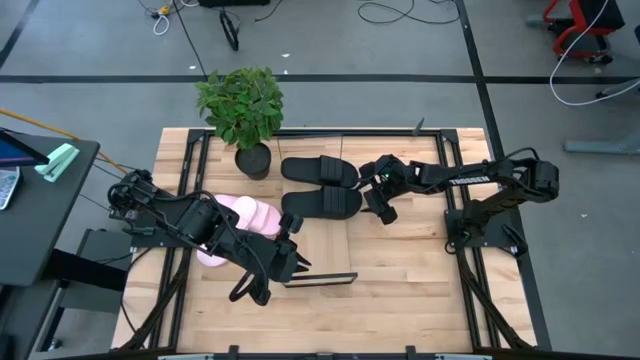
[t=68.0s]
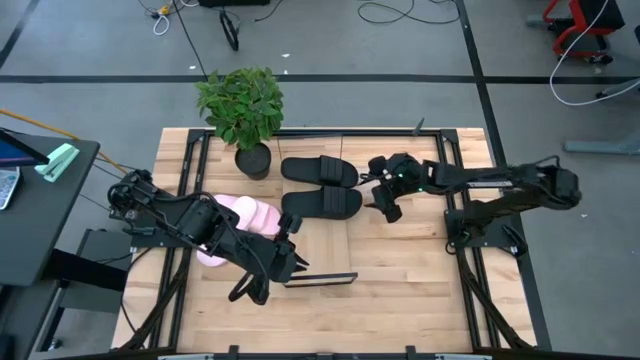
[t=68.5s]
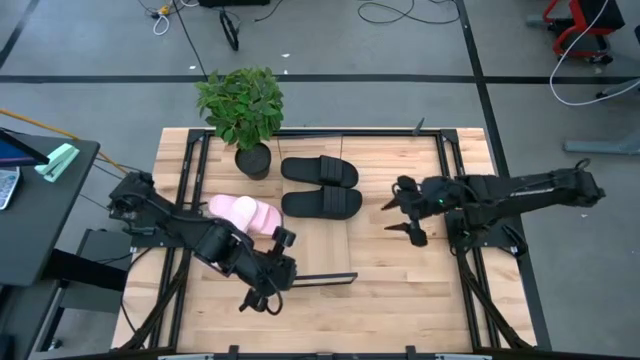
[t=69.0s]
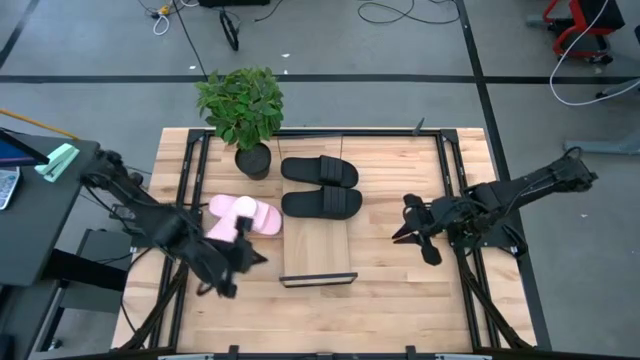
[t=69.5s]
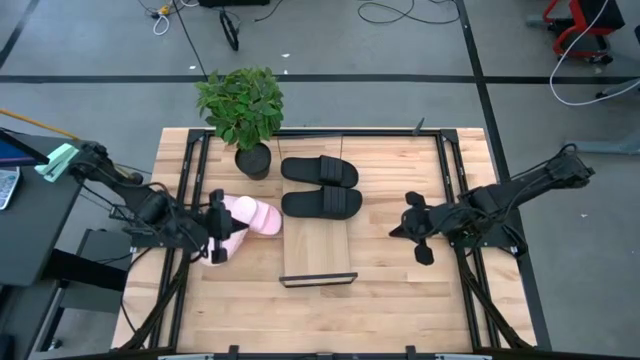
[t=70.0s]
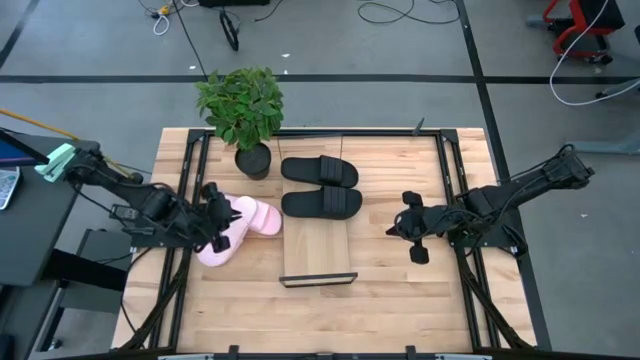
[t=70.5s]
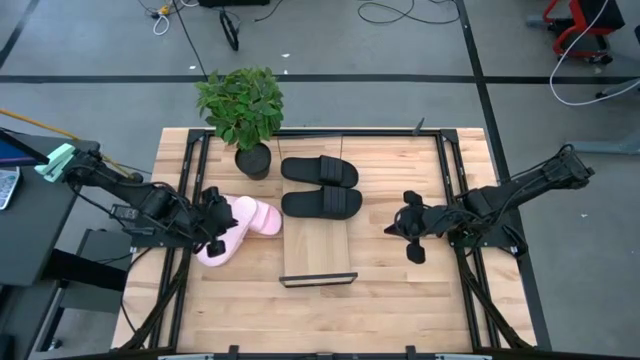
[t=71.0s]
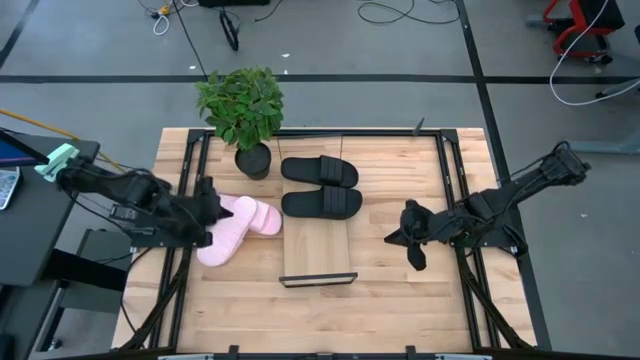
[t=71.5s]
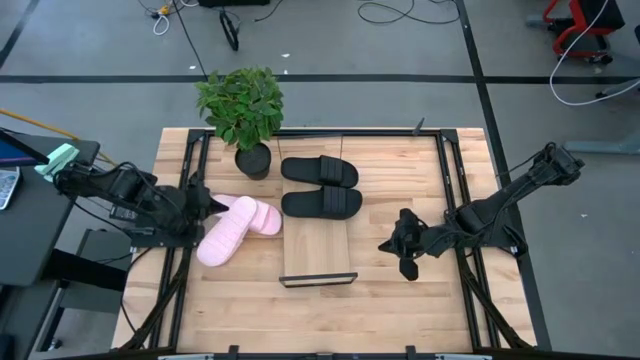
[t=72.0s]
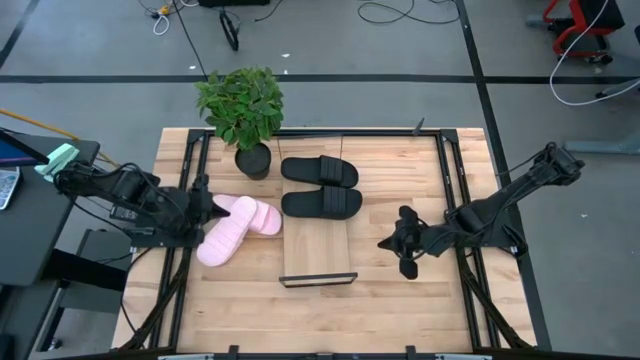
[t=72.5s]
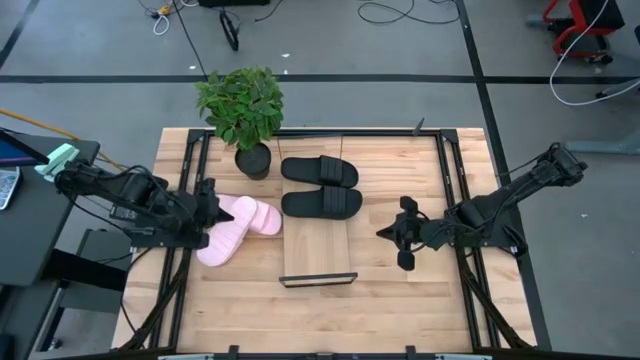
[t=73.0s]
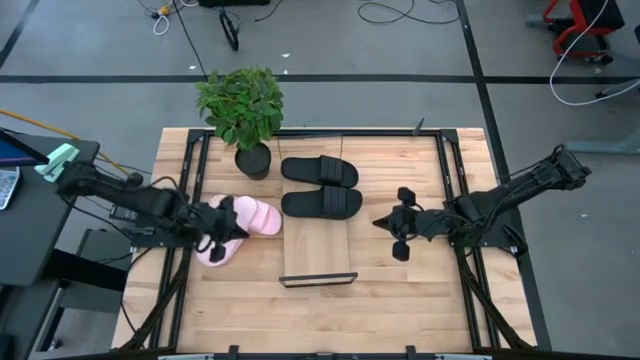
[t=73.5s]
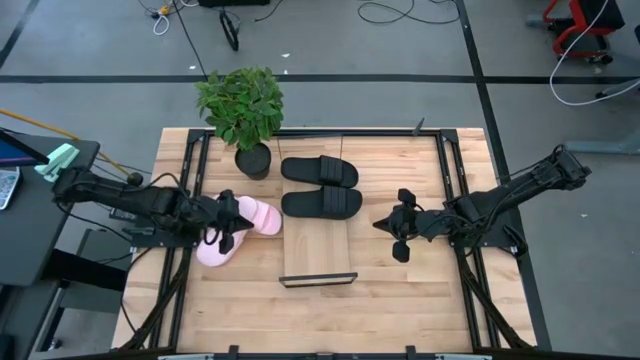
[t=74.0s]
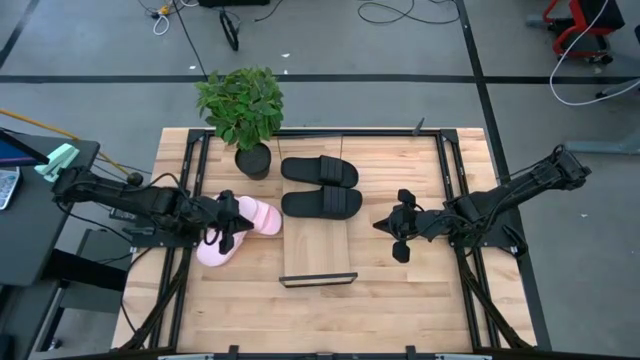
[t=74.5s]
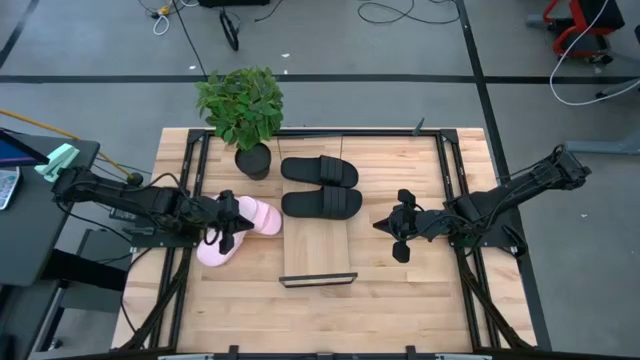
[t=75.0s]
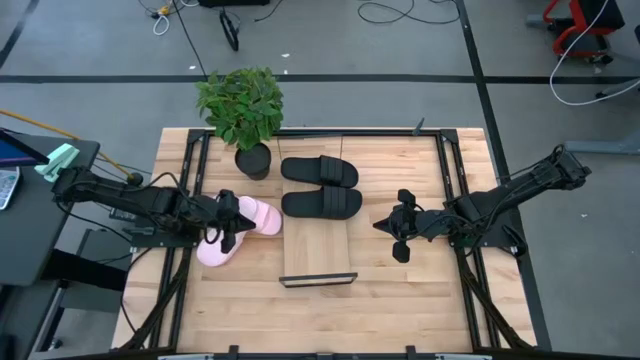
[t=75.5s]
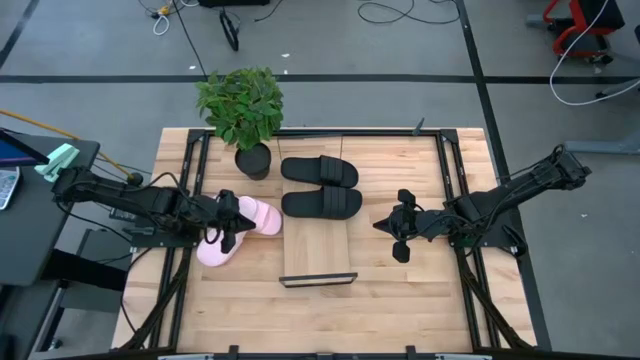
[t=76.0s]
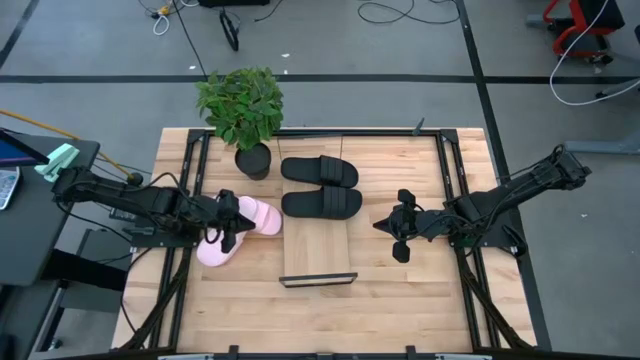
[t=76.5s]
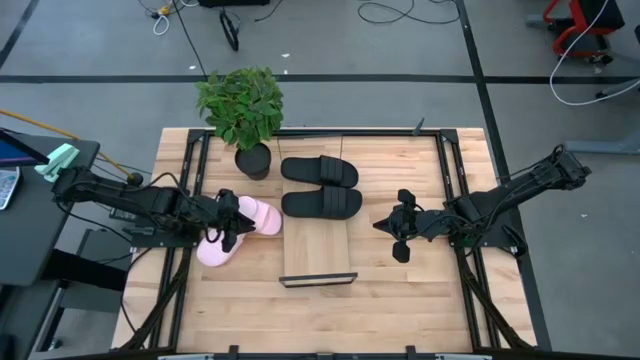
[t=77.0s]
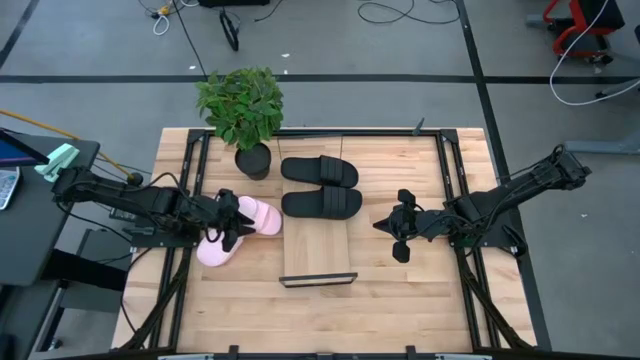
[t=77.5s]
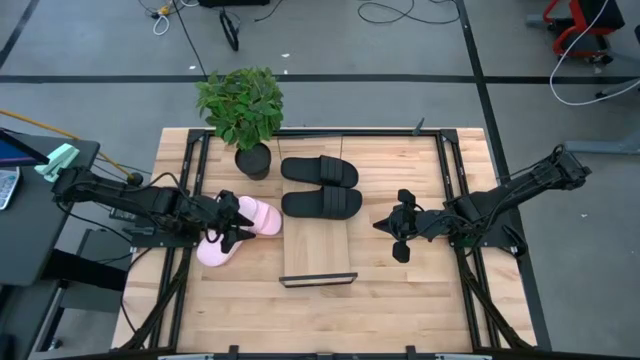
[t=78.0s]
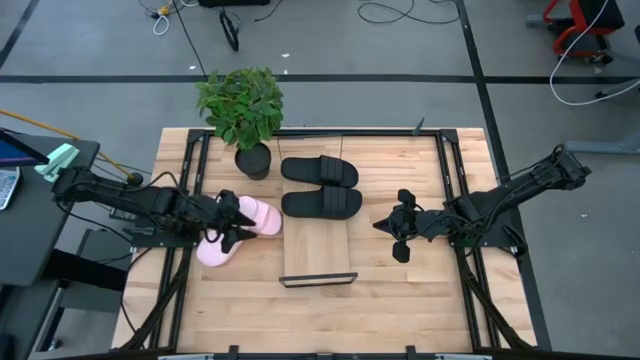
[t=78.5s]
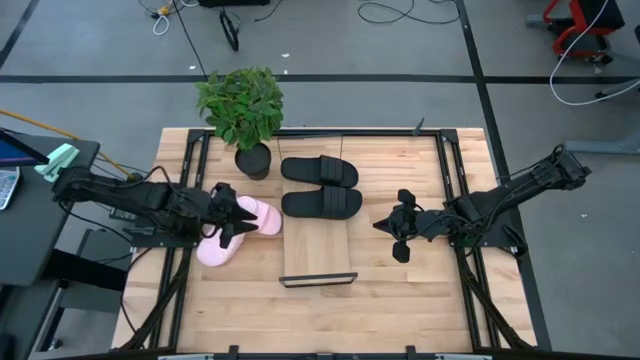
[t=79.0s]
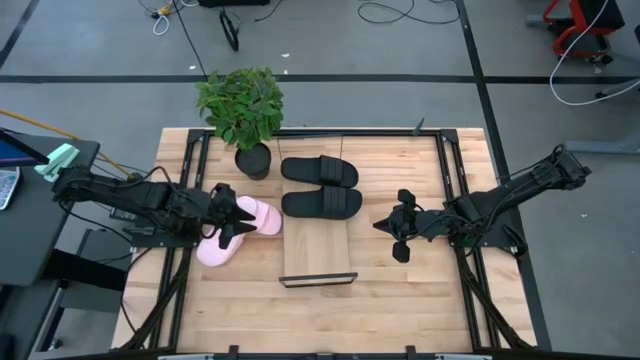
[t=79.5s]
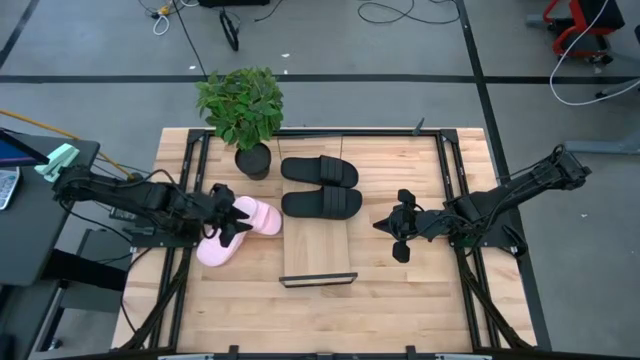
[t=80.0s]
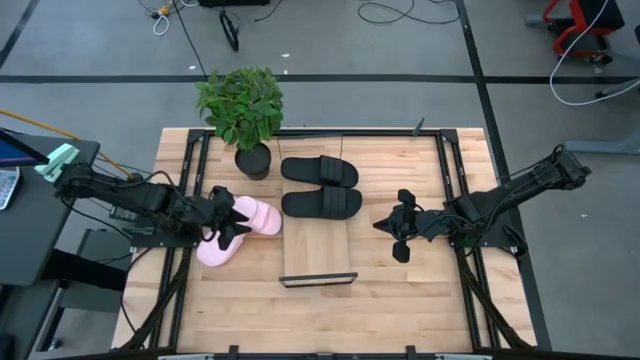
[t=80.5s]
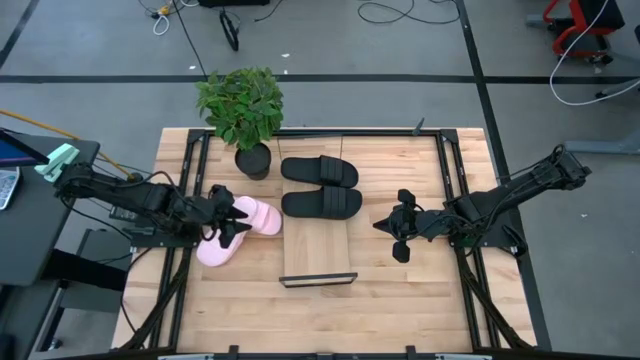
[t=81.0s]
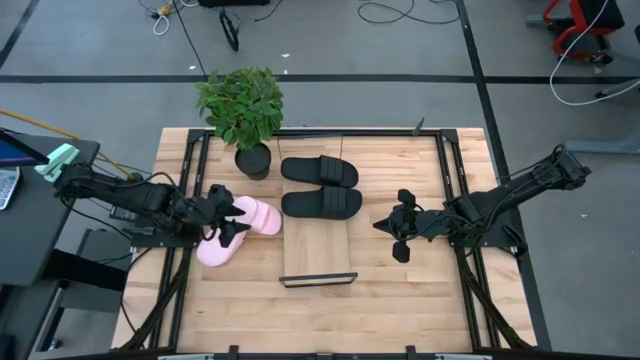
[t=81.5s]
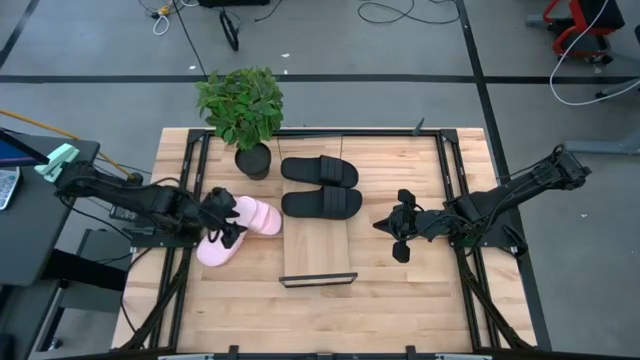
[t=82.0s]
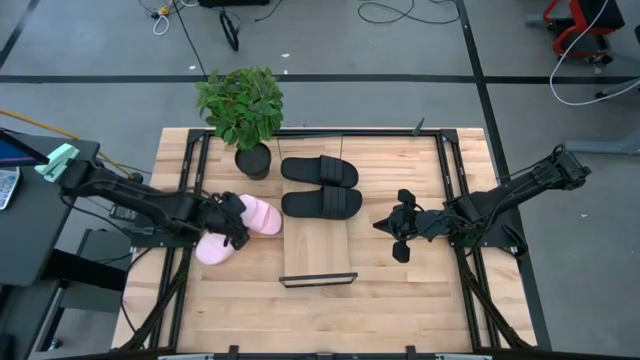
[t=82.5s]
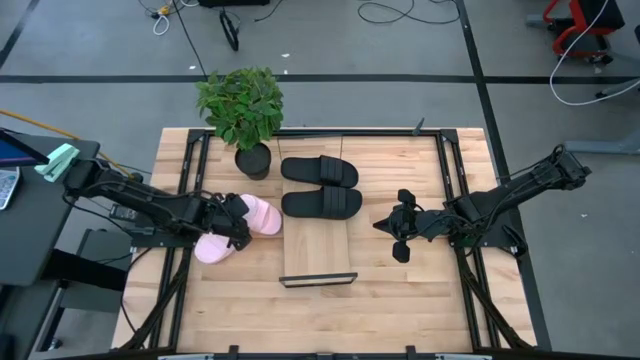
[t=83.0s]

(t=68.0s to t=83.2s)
Task: Pick and place slides into the shelf
Put the bottom pink slipper on the shelf

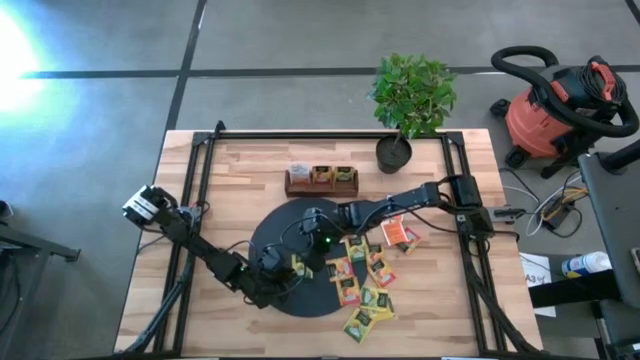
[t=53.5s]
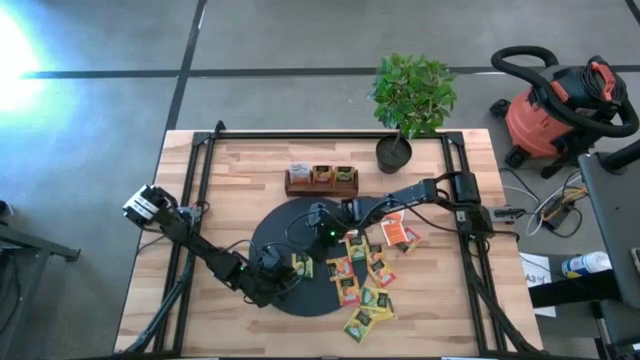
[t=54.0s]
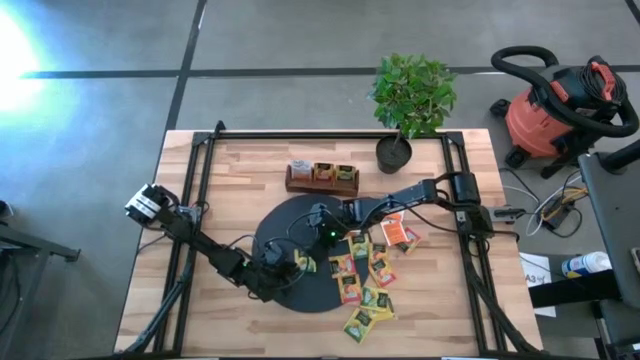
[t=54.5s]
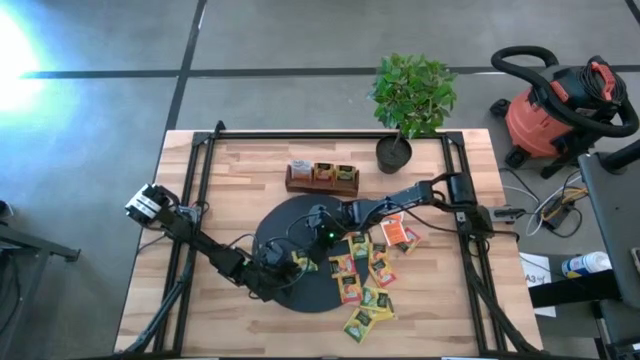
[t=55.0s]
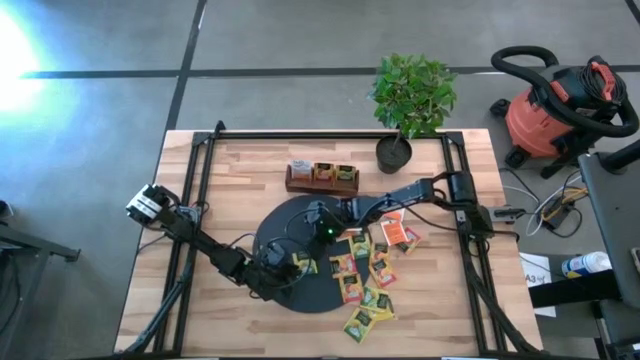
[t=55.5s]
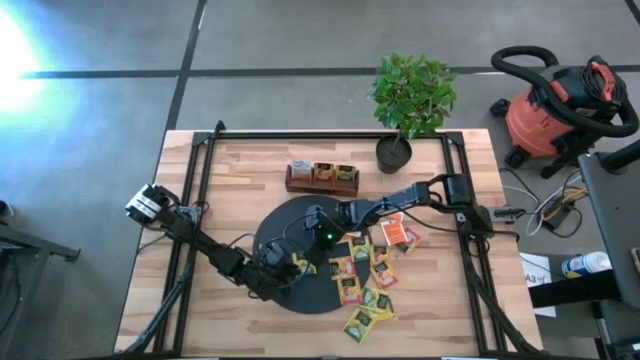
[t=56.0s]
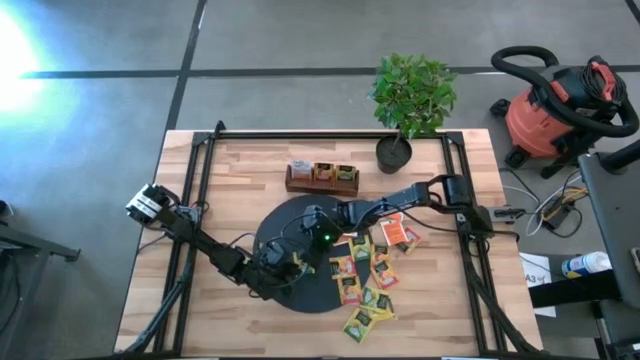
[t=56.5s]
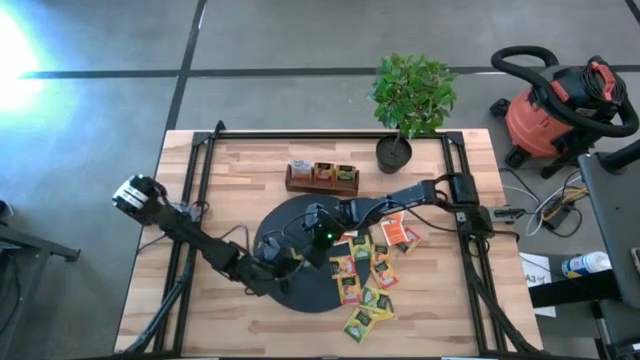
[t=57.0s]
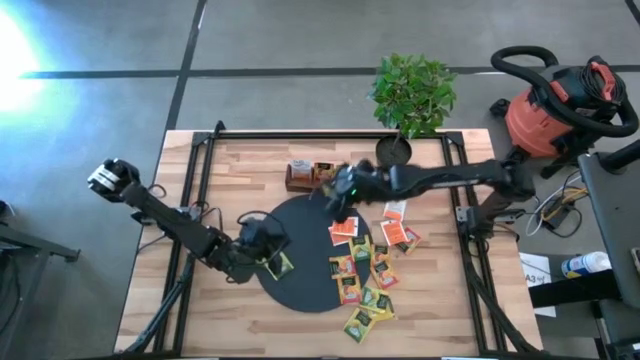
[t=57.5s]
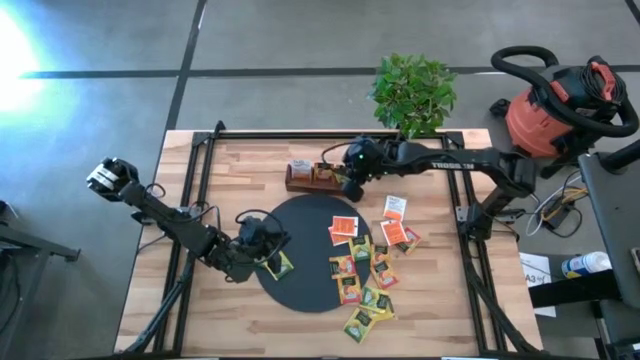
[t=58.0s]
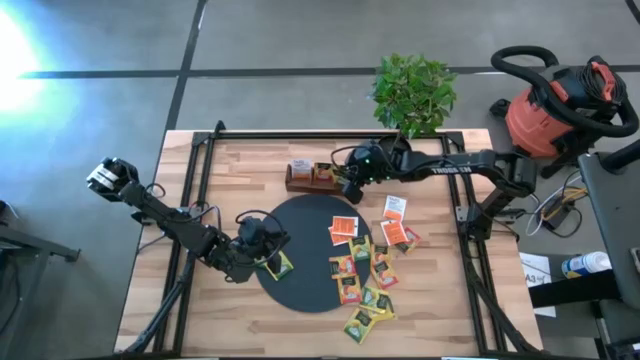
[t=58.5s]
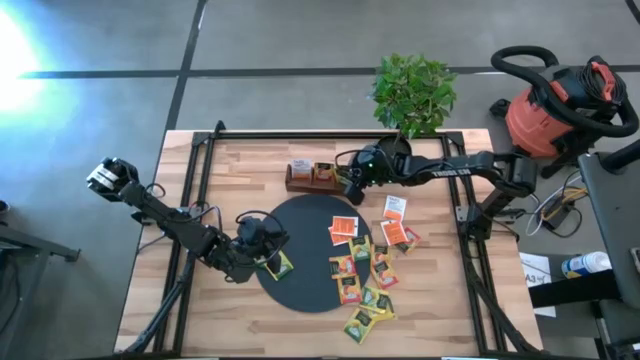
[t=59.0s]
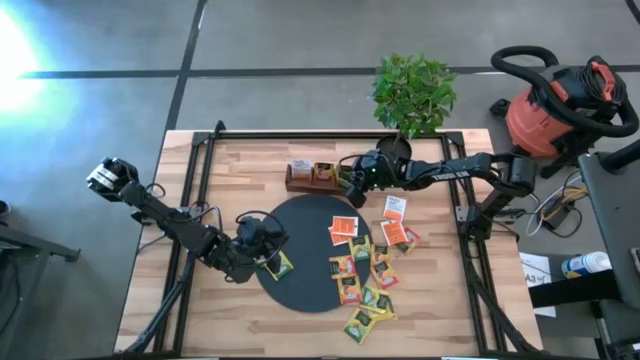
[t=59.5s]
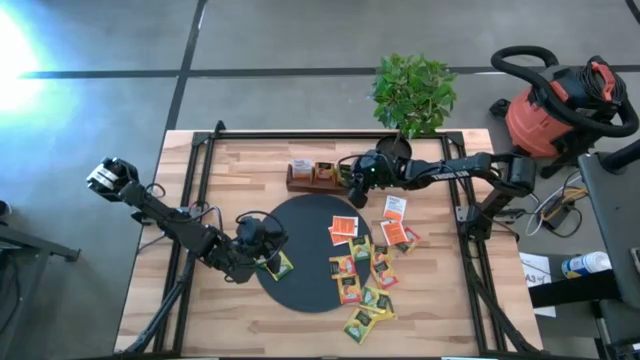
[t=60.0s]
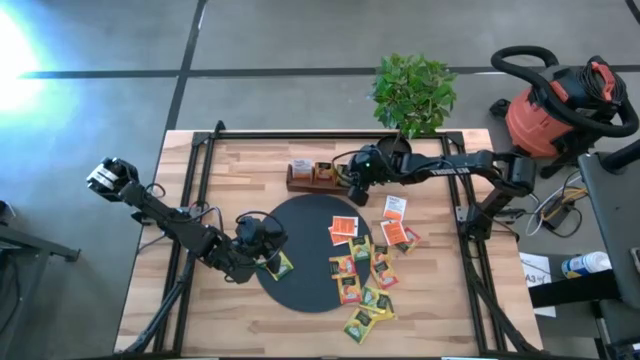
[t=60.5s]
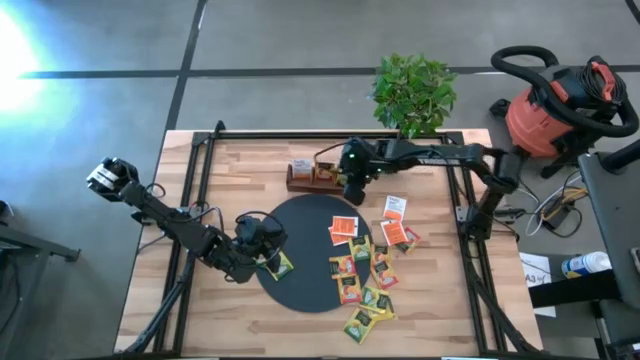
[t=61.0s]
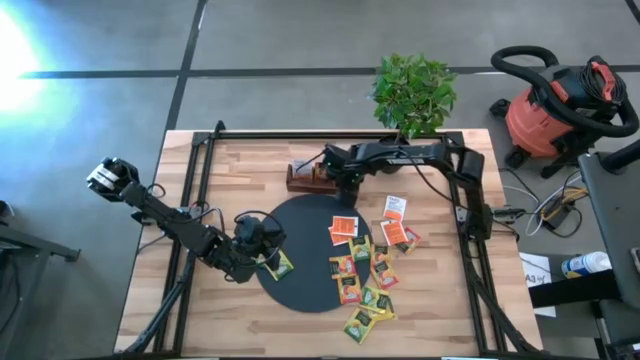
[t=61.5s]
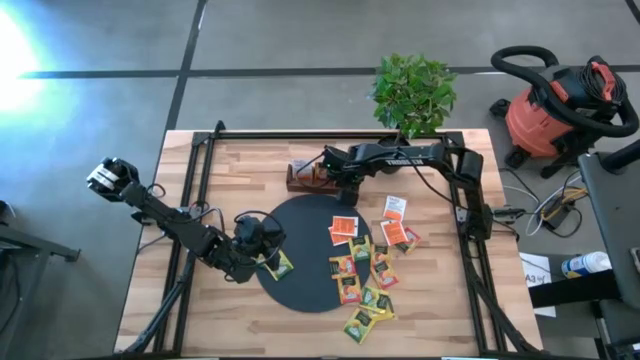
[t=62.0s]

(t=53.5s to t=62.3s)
Task: Pick & Place Tea
Put the yellow tea bag into the right section of the brown wooden organizer
